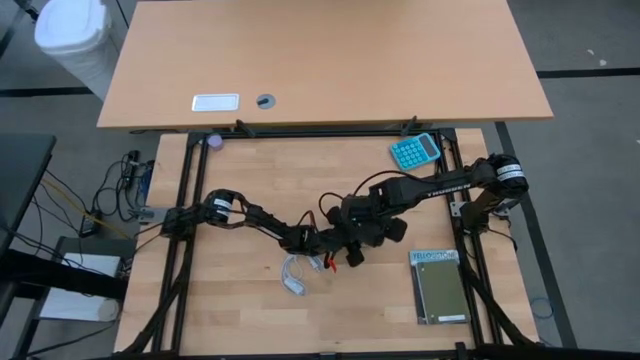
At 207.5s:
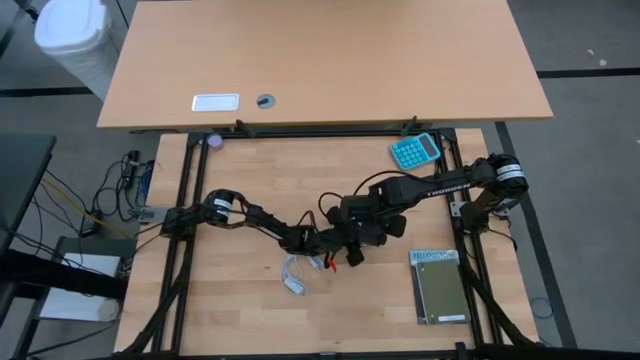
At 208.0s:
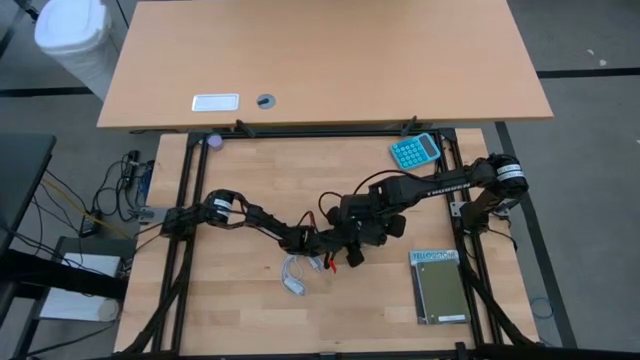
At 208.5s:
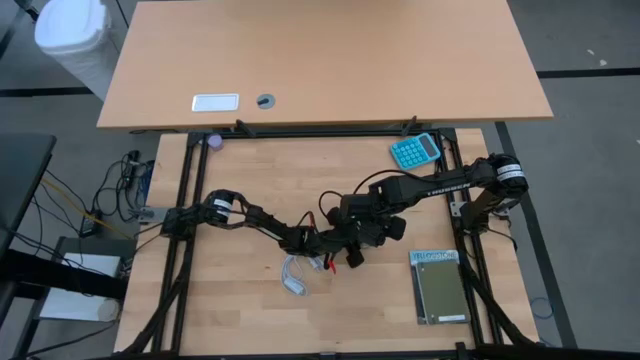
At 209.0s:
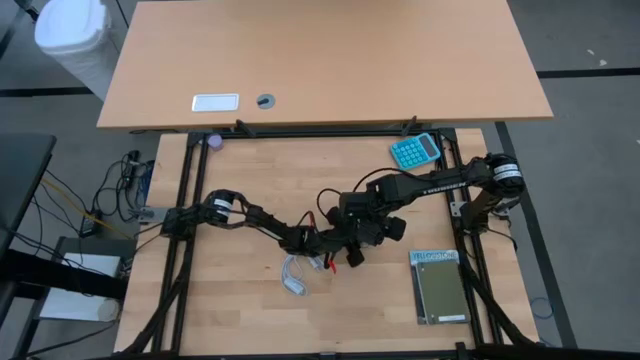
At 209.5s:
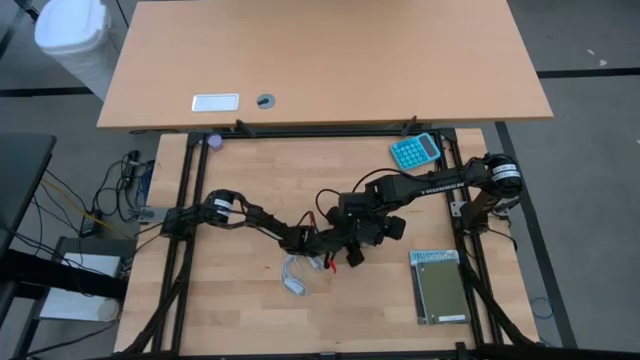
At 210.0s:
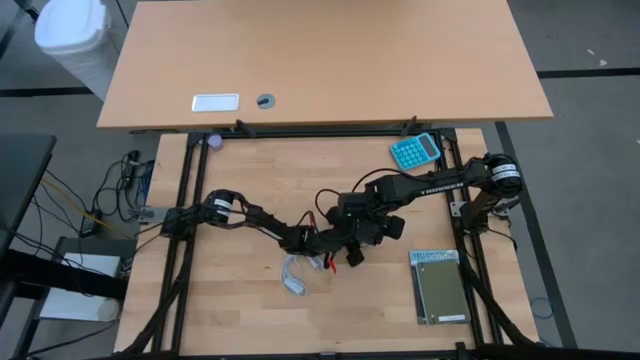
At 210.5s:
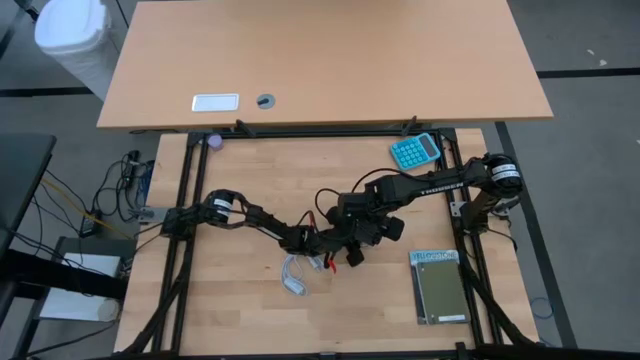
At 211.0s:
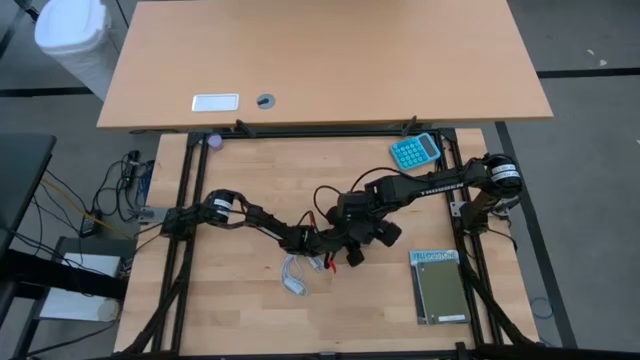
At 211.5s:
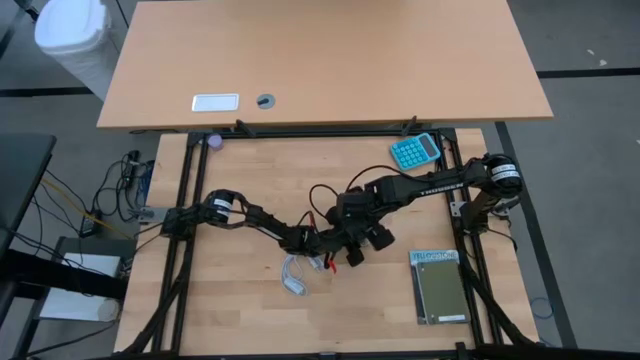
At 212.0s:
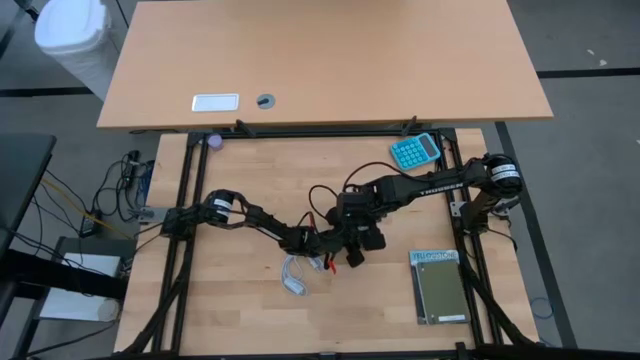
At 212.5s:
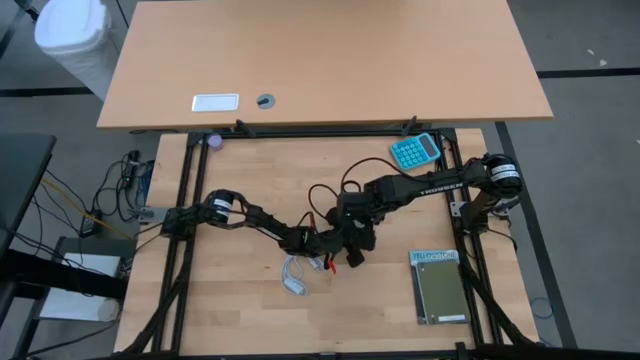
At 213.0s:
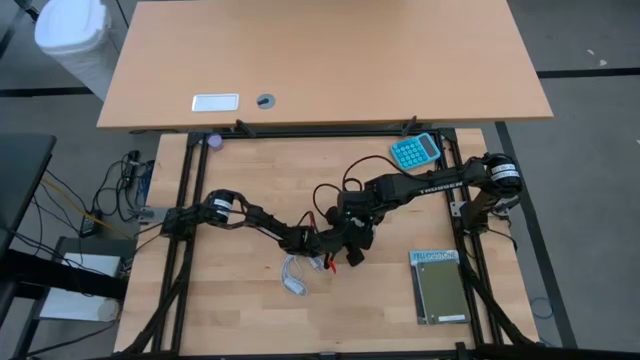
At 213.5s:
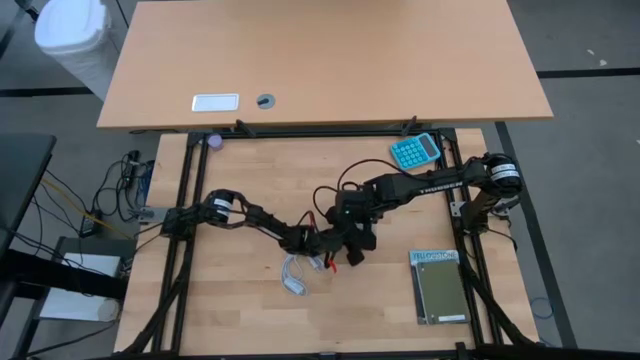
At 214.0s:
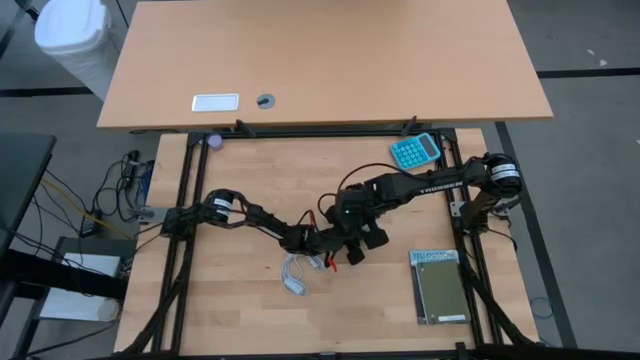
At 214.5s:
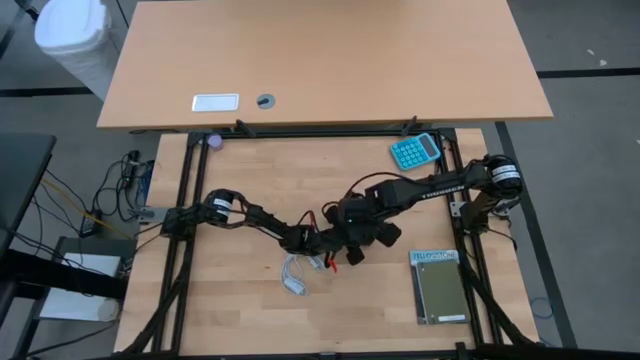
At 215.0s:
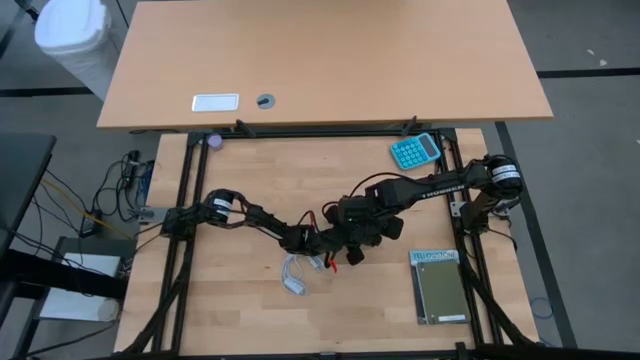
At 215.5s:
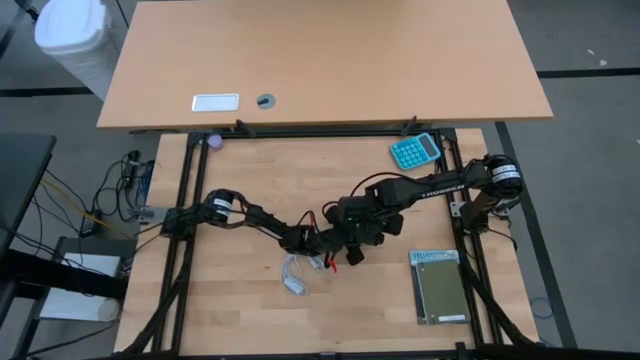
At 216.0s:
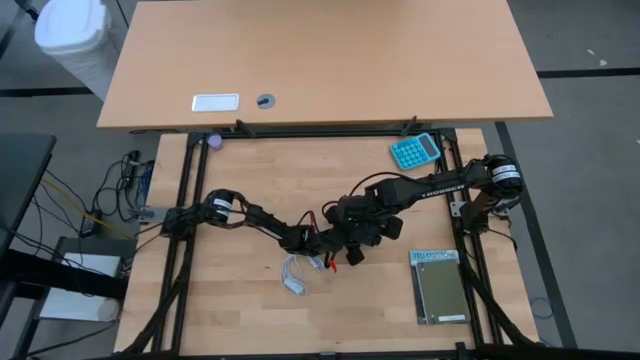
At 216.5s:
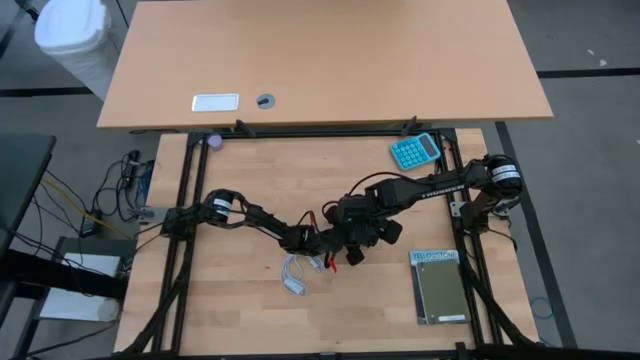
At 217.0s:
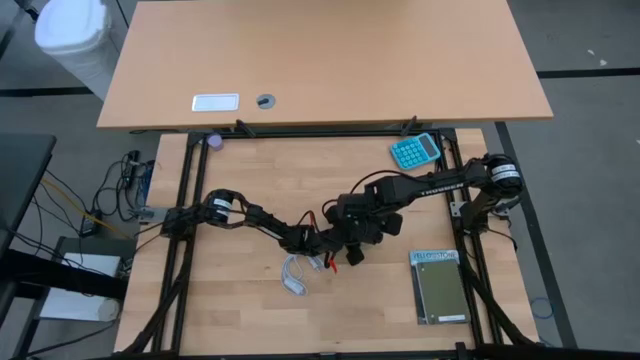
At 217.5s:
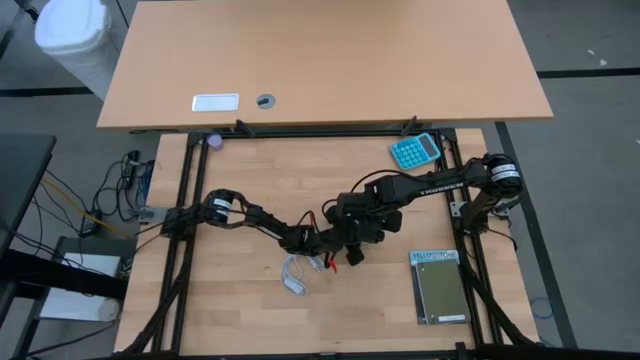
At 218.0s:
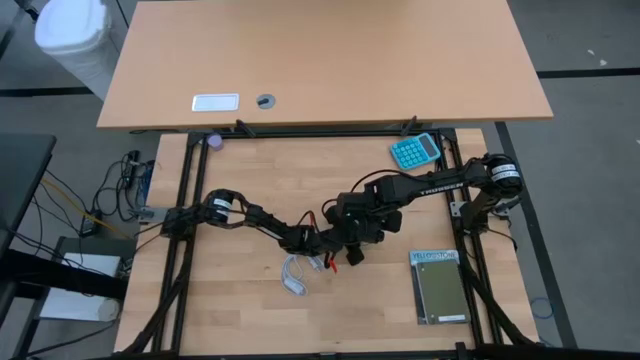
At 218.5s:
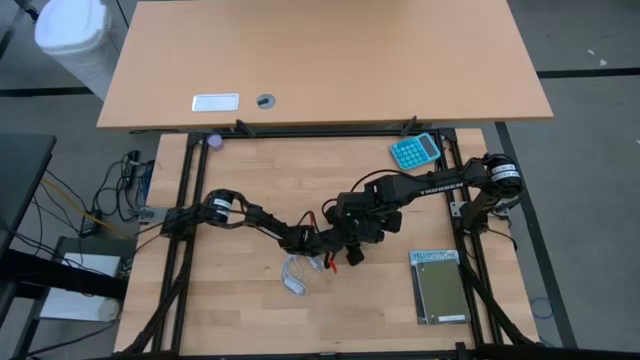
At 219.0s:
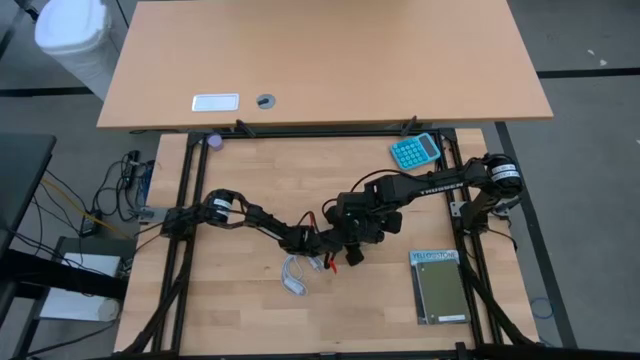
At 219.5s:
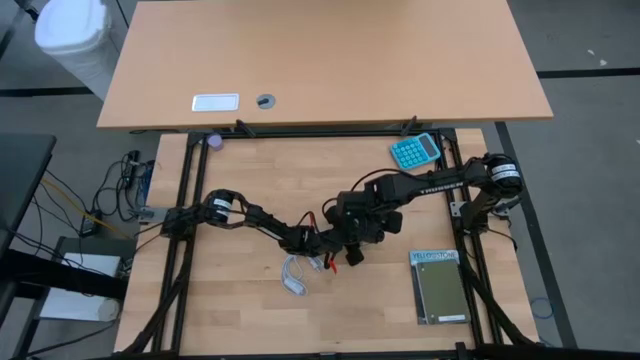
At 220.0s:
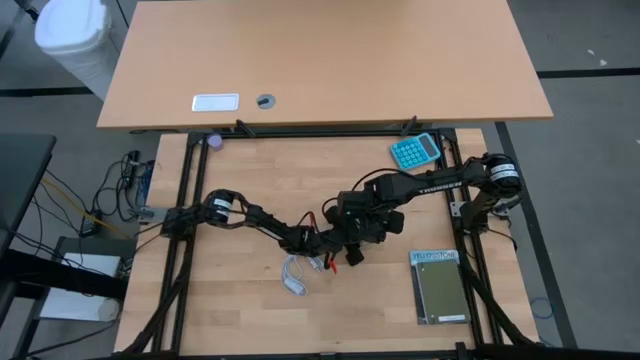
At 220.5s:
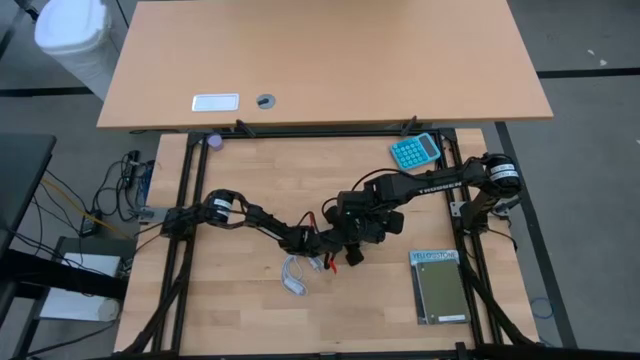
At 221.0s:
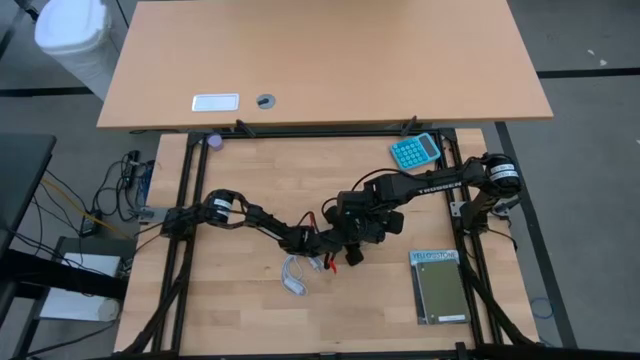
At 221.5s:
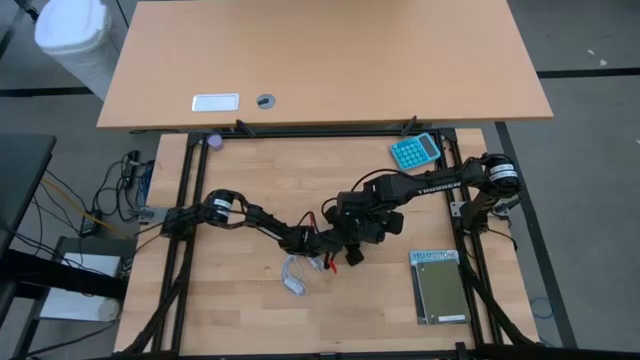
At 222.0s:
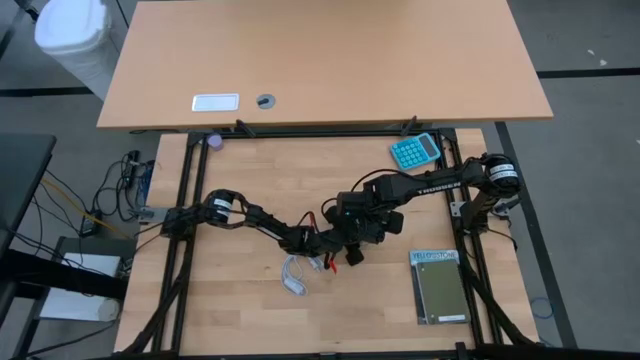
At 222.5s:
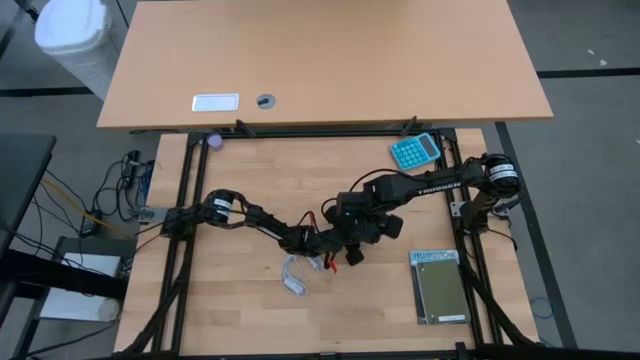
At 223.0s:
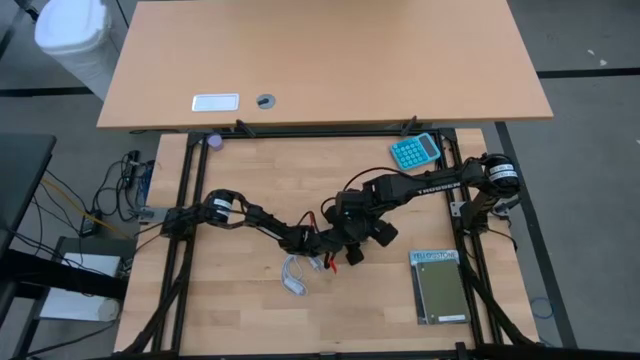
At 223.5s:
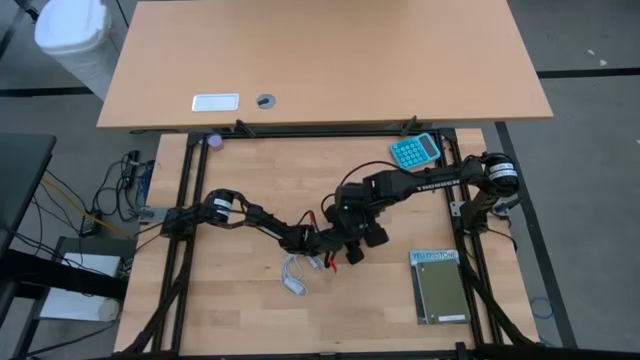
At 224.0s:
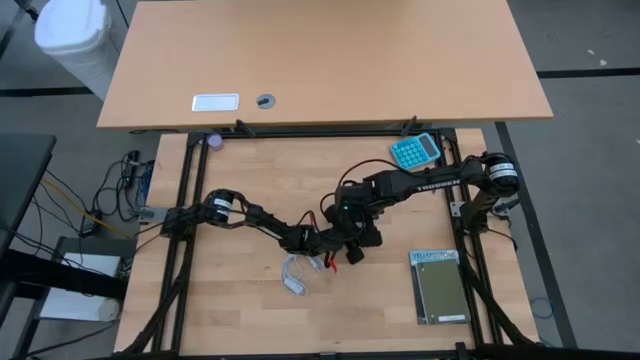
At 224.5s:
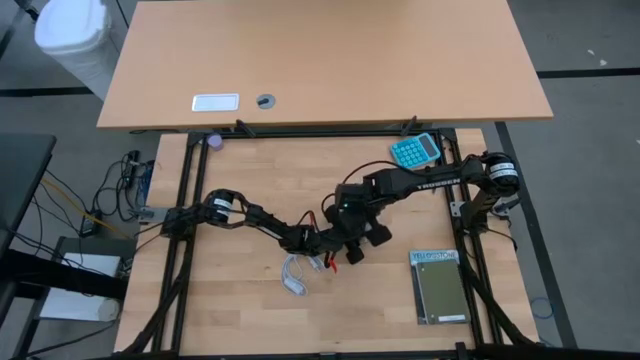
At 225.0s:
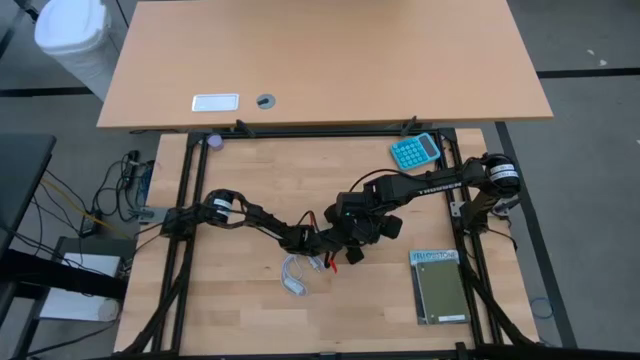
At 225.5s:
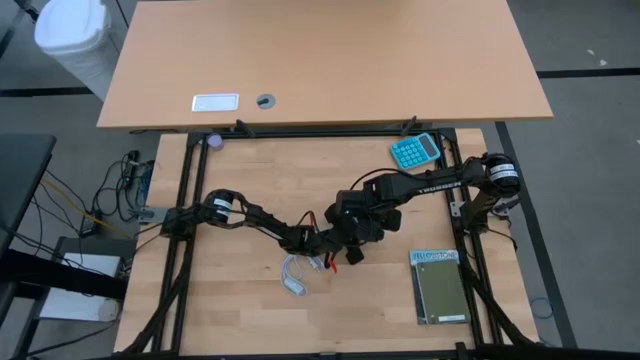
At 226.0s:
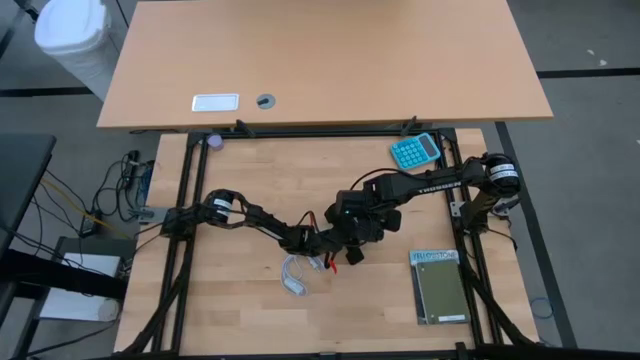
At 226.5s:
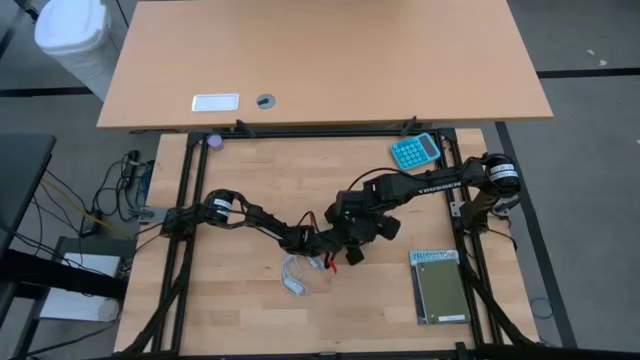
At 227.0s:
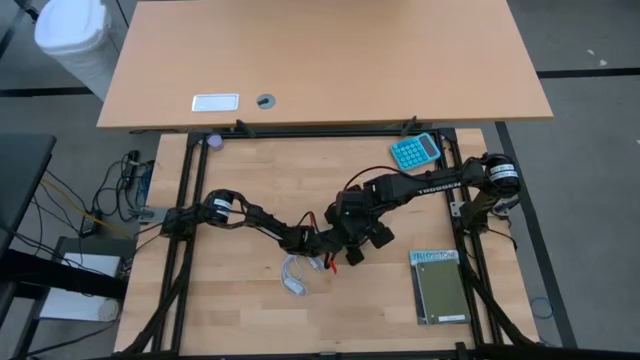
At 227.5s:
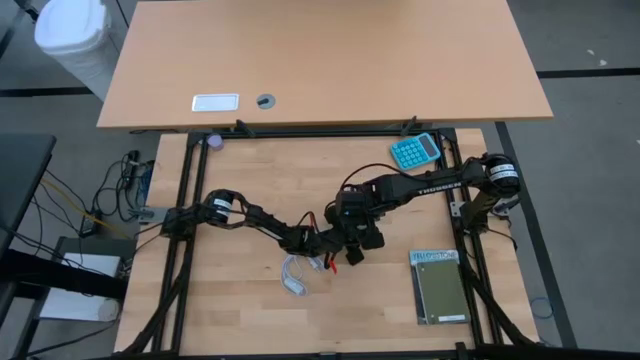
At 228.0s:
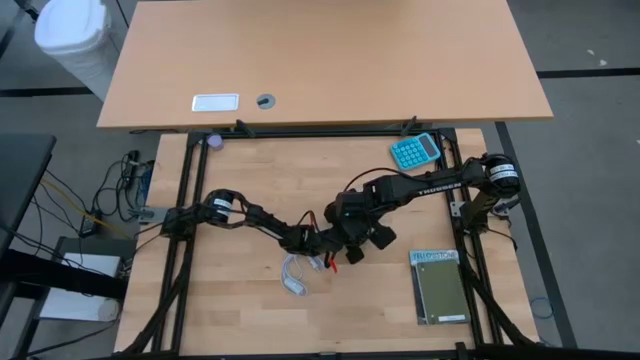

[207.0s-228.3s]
Task: Screw lightbulb
Insert the lightbulb into the socket
